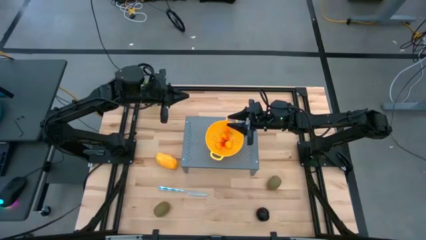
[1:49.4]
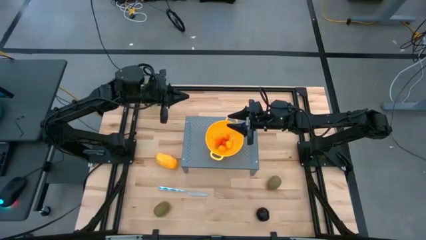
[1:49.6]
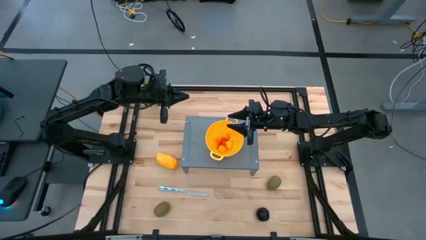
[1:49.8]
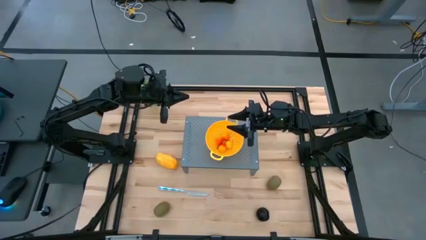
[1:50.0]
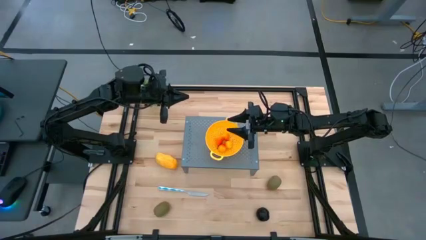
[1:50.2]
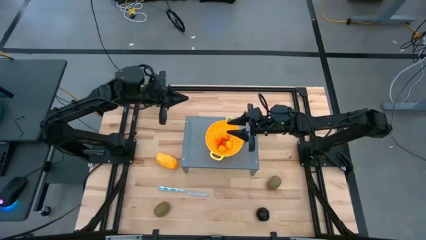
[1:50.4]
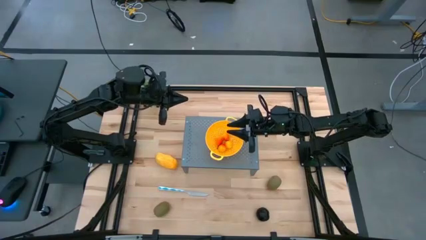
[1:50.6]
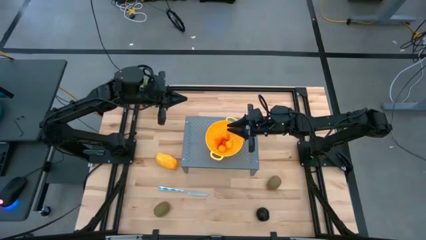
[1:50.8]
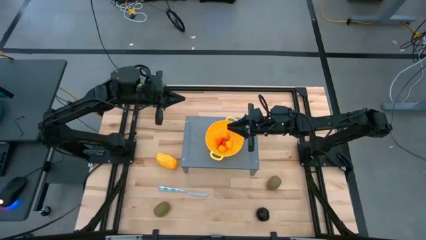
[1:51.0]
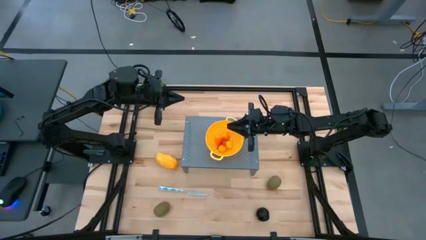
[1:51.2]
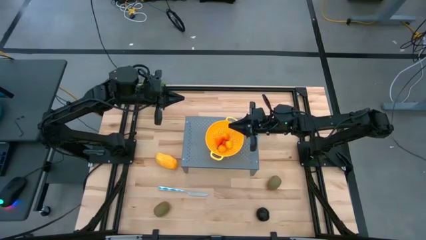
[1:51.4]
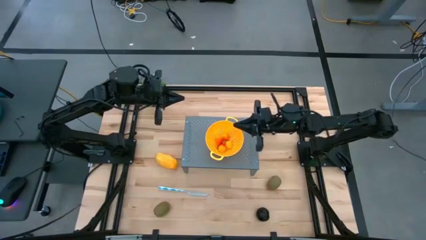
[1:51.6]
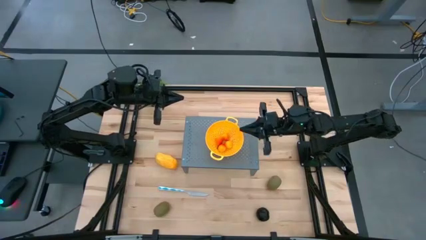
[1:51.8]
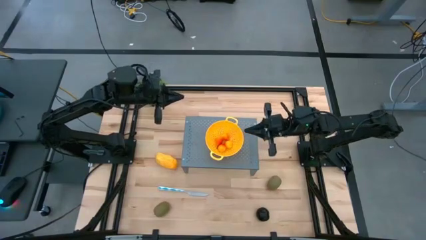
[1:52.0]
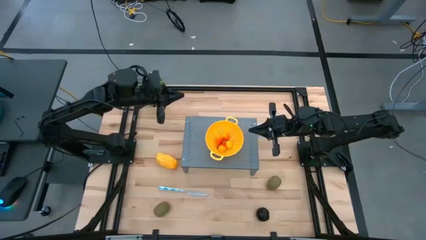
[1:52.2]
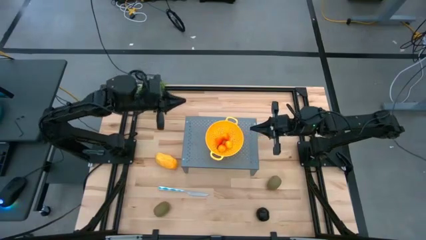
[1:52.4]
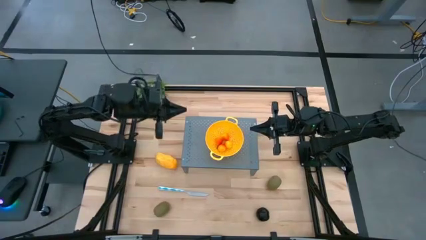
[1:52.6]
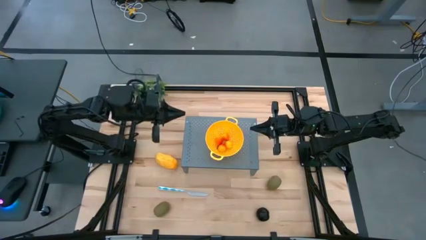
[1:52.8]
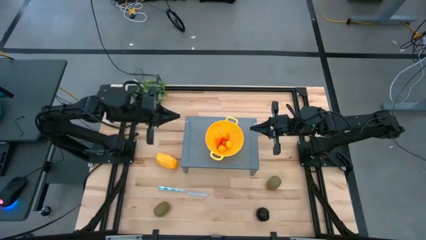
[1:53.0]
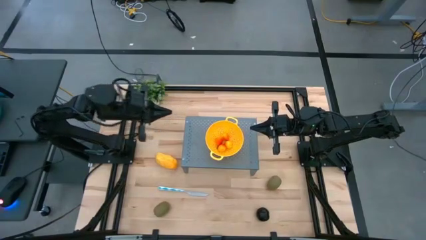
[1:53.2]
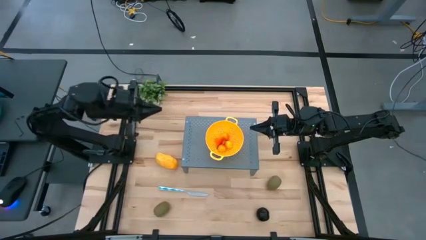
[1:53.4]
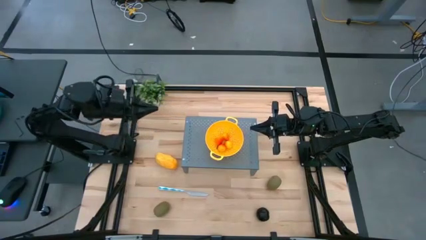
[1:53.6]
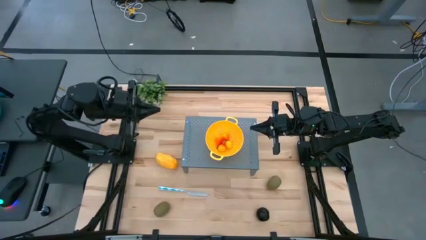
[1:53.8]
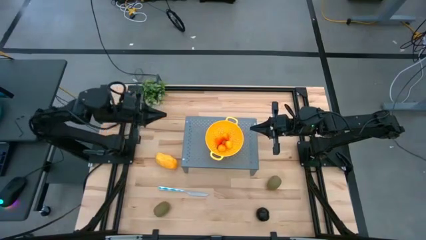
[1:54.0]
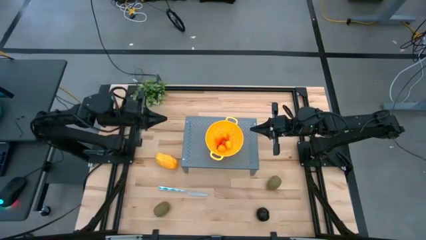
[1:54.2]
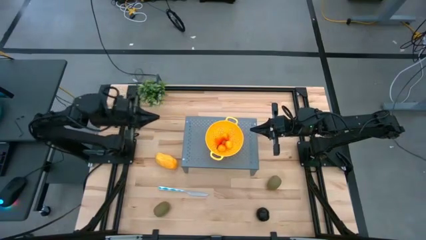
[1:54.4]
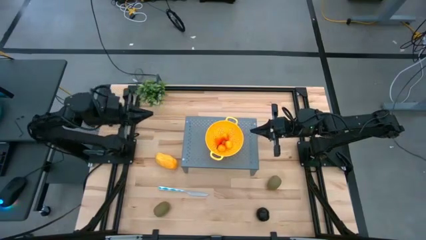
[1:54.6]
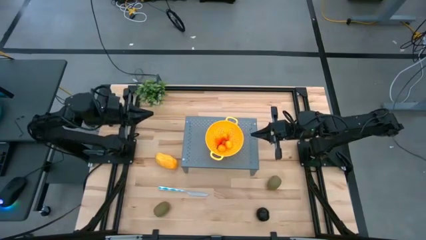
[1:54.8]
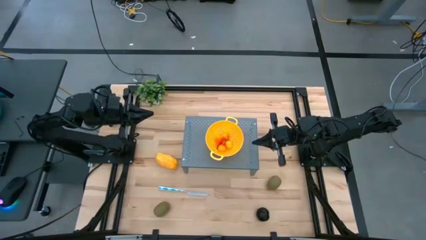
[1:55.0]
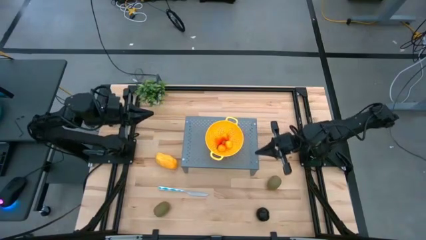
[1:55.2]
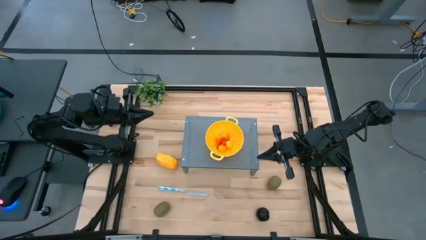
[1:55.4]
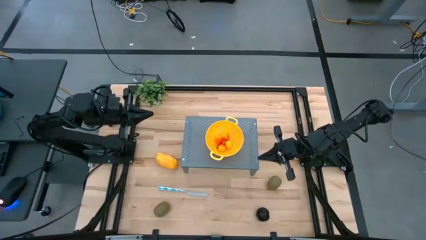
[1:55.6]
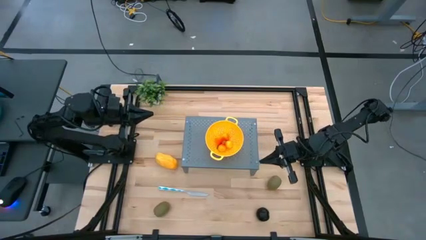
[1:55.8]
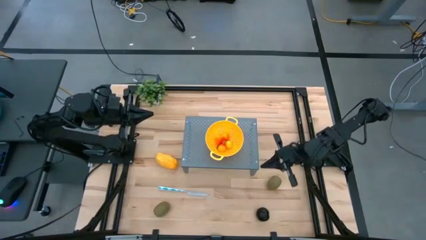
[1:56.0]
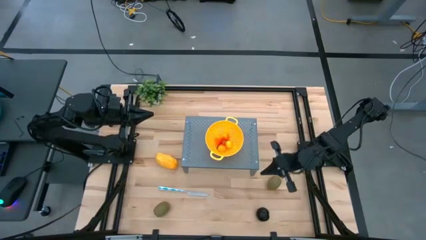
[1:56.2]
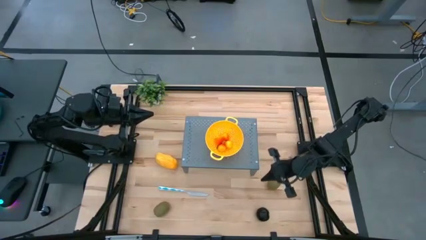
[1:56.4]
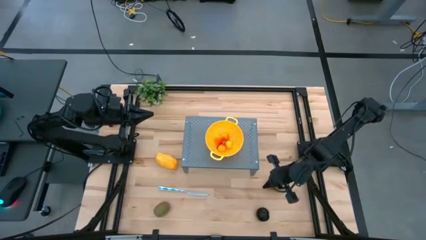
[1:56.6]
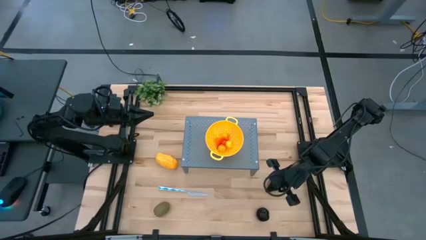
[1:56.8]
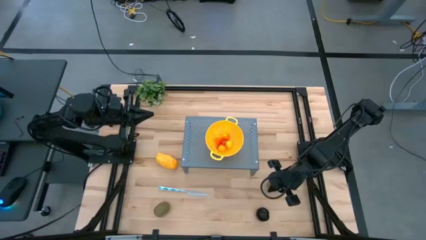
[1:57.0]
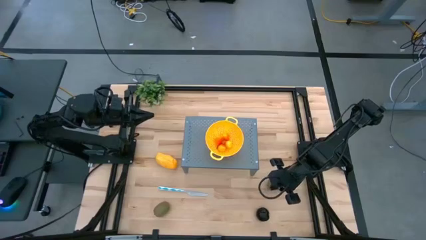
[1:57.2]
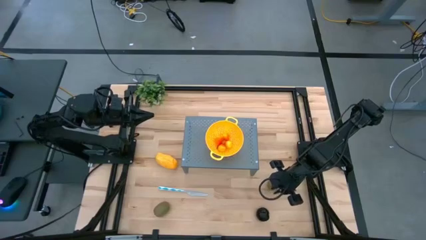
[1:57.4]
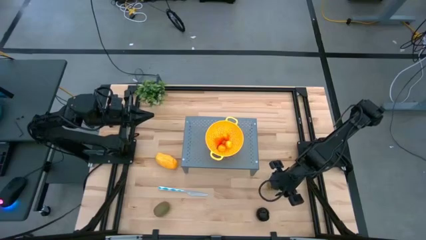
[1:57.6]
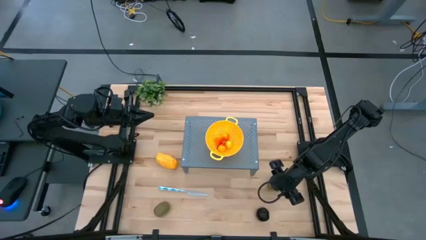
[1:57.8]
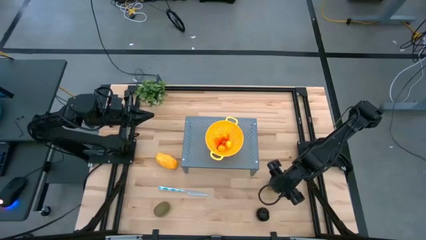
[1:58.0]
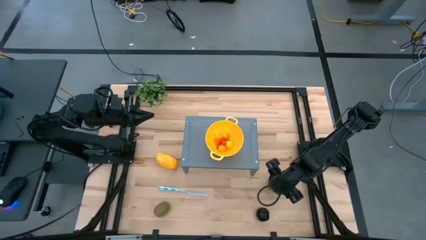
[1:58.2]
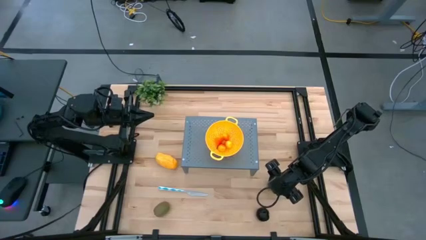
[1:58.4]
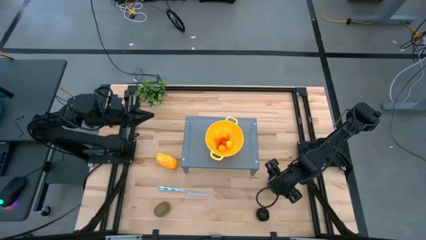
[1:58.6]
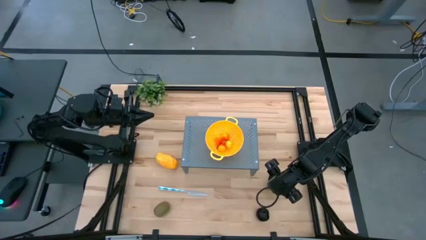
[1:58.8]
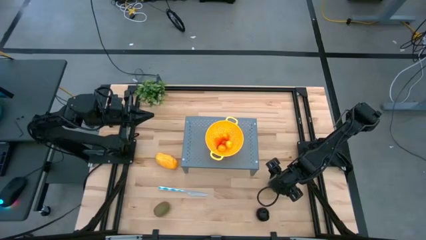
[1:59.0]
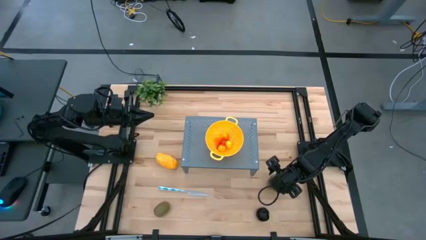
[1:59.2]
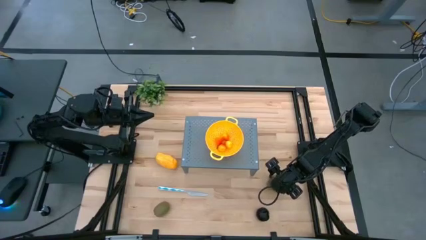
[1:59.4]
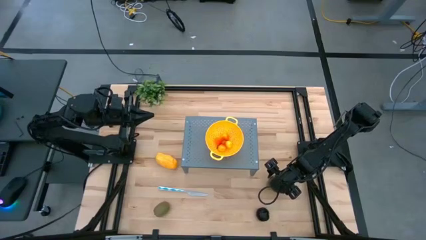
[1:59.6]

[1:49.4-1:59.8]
Task: Pick & Place Fruit
Put the right kiwi into the strainer bowl on the shelf

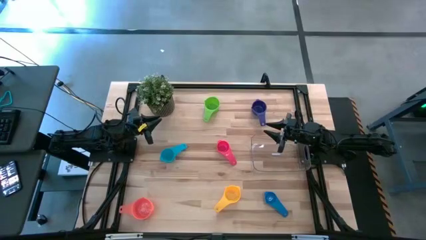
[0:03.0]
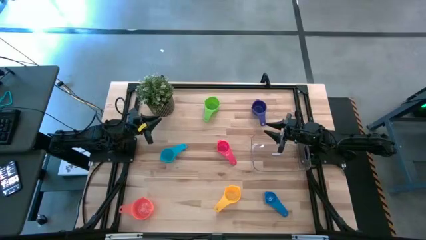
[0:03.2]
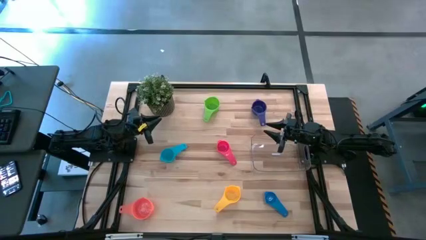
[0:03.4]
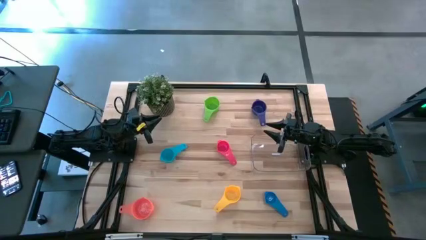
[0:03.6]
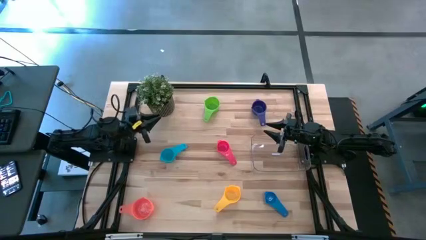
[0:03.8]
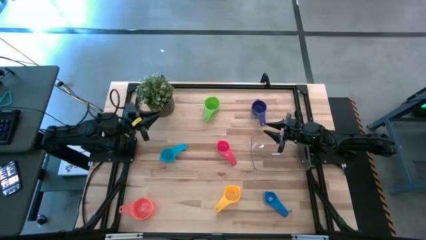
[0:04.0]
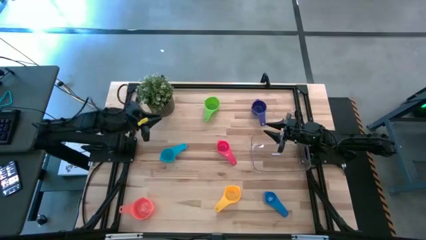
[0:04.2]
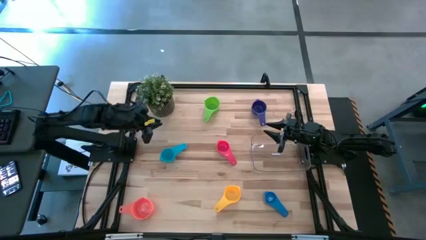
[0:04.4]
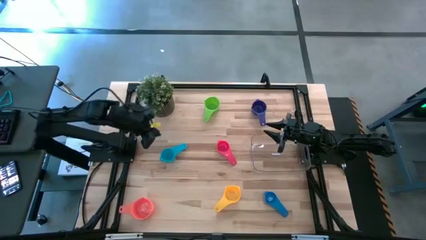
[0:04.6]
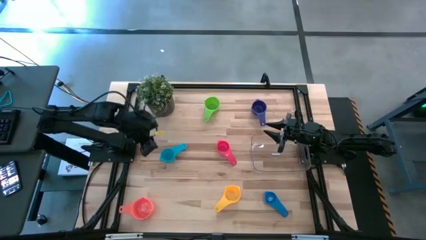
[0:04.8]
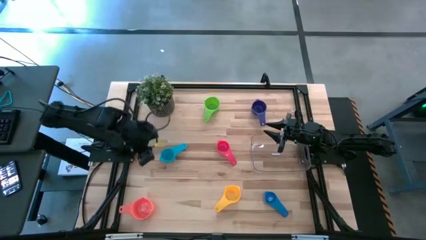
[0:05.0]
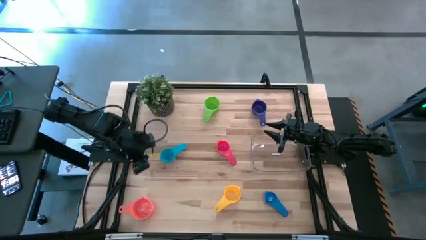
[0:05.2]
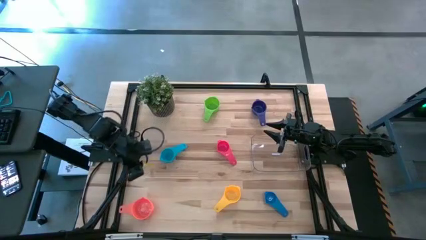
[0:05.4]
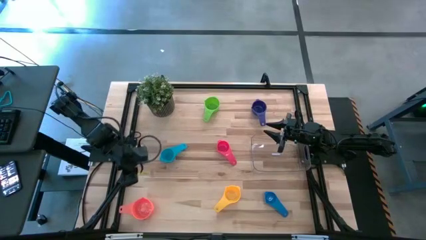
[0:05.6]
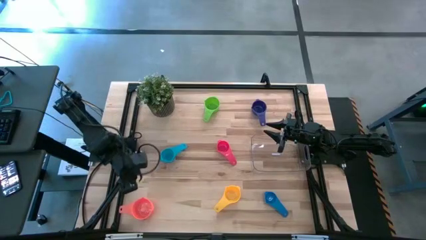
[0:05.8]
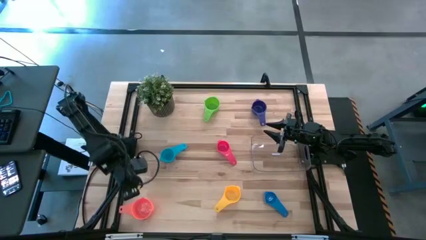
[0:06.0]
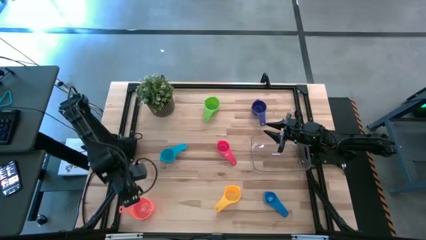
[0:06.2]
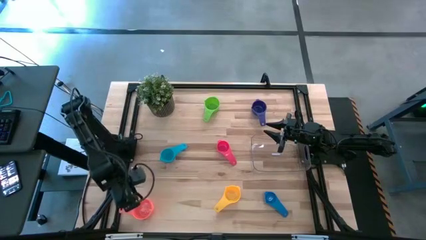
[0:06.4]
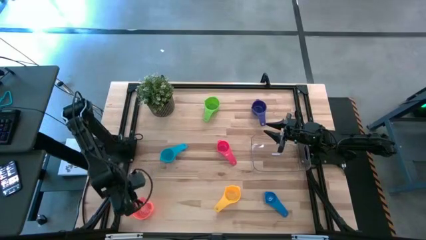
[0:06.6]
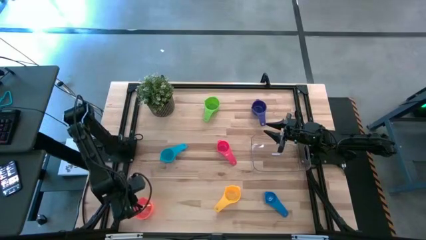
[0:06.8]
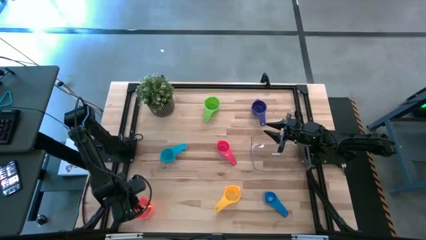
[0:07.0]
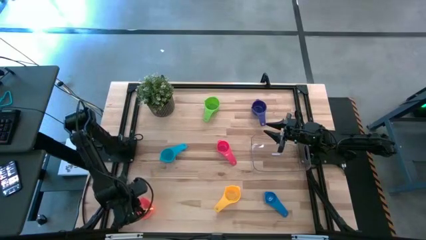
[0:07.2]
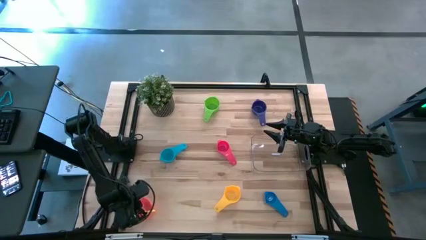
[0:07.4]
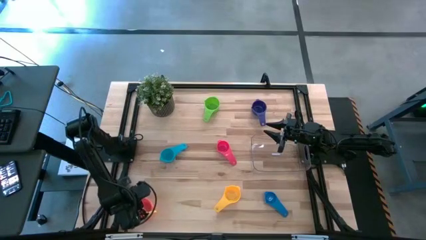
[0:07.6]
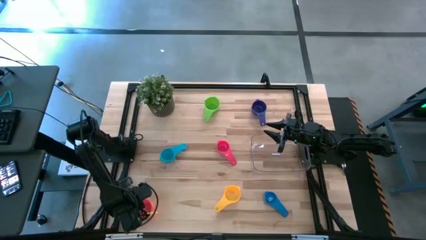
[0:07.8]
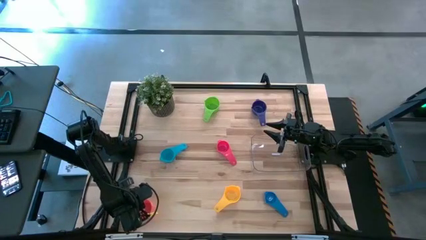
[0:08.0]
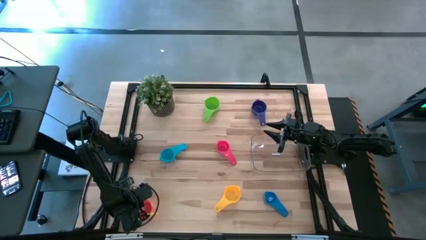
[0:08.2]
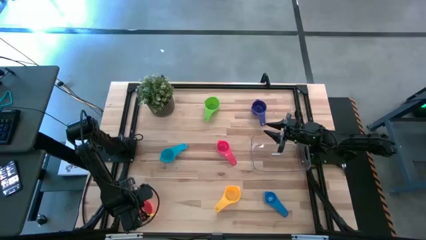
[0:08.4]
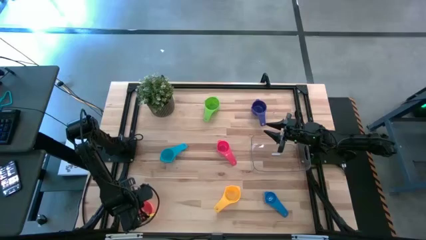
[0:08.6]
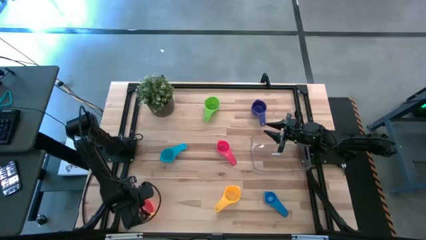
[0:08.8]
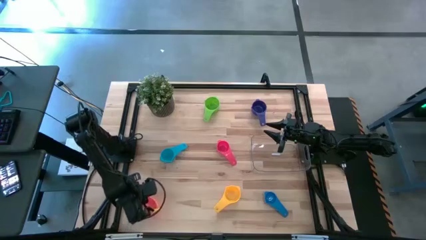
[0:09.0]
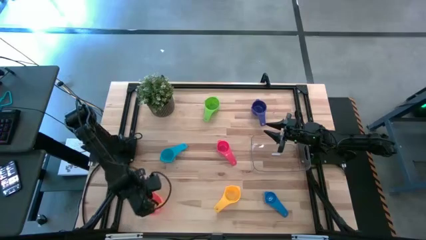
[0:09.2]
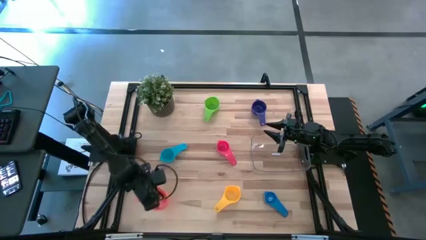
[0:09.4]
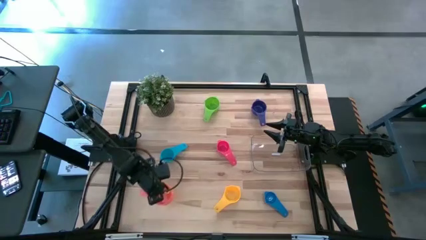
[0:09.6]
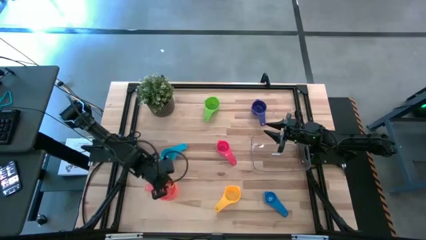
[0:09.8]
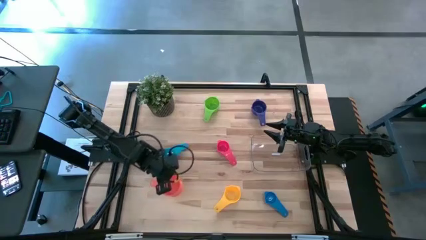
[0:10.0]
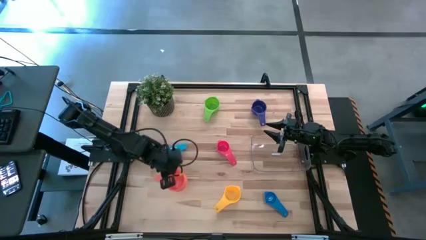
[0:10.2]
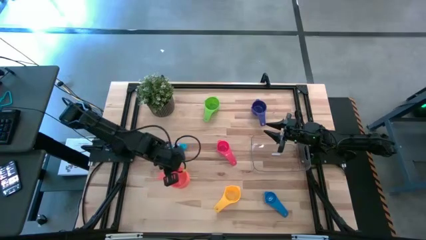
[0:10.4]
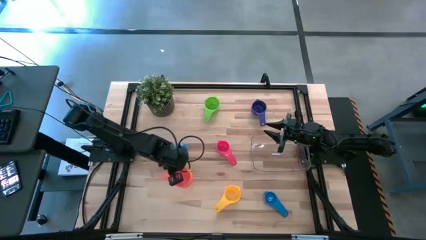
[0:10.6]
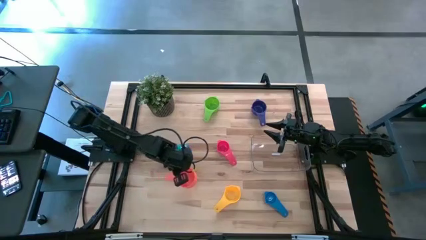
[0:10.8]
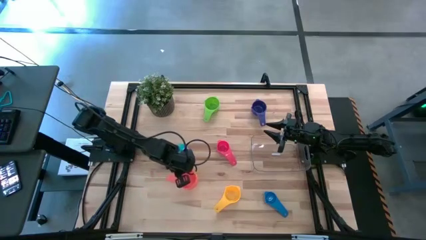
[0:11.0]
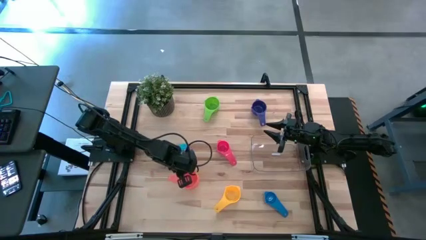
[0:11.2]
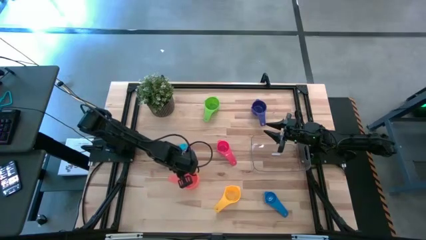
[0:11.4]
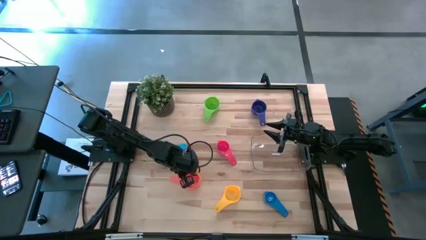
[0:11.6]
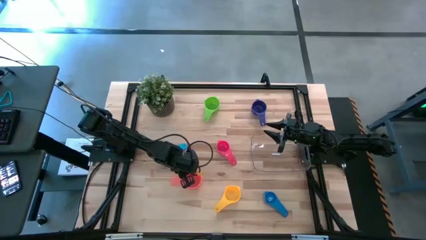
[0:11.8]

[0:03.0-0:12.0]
Task: Nest measuring cups in basket
Move the orange measuring cup to the center of the table
